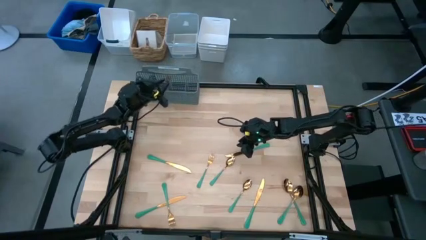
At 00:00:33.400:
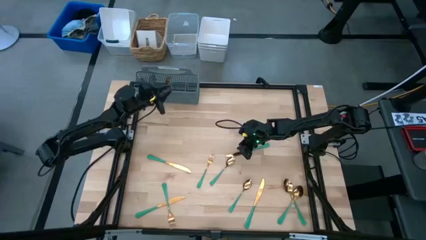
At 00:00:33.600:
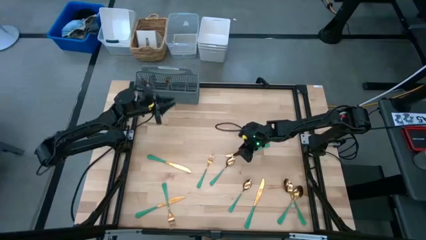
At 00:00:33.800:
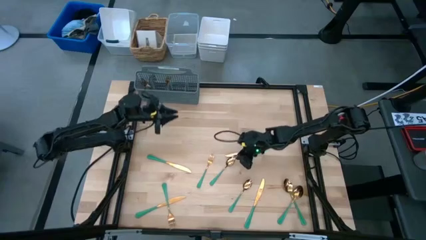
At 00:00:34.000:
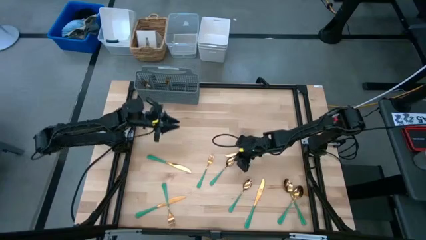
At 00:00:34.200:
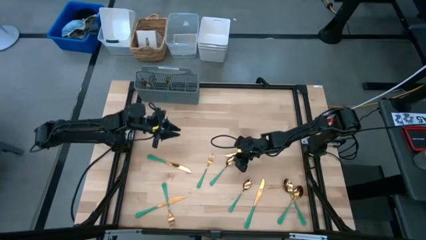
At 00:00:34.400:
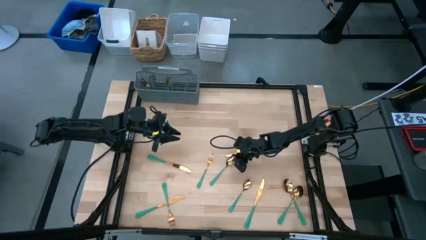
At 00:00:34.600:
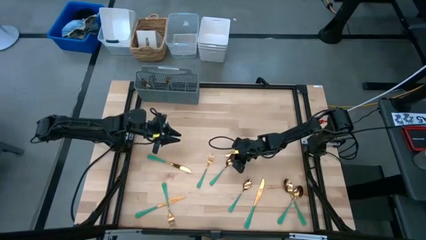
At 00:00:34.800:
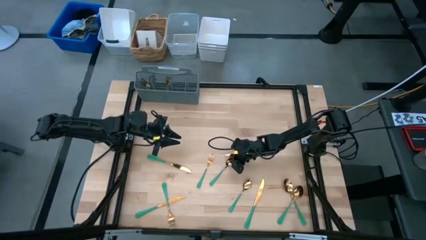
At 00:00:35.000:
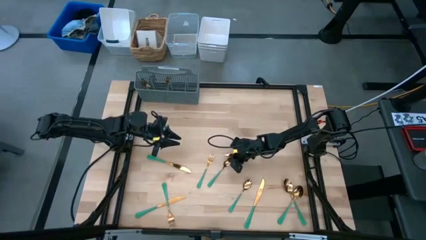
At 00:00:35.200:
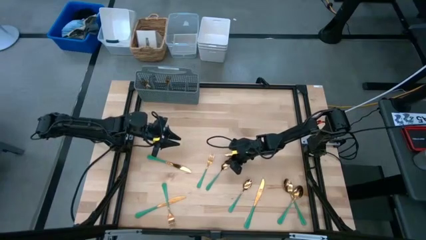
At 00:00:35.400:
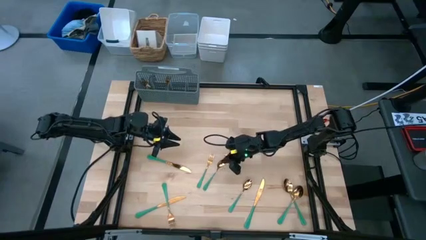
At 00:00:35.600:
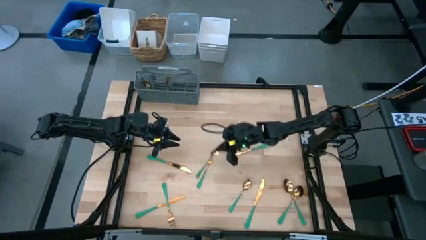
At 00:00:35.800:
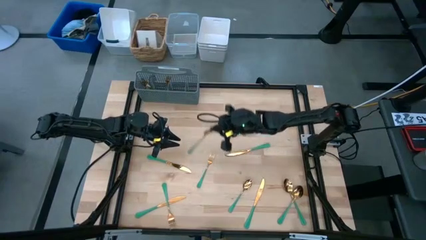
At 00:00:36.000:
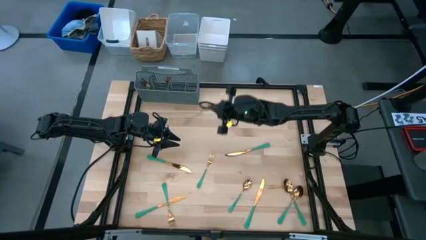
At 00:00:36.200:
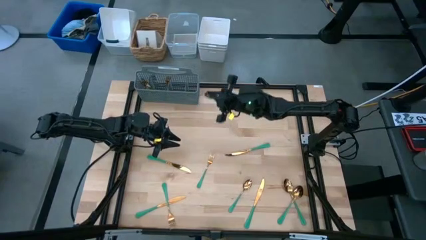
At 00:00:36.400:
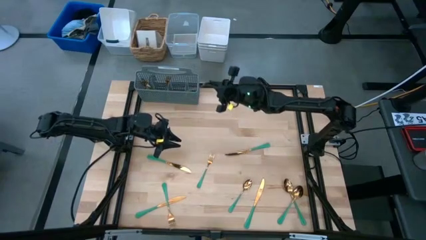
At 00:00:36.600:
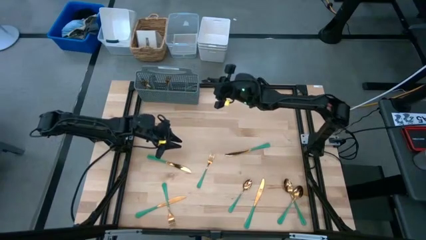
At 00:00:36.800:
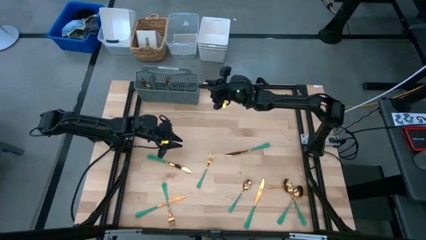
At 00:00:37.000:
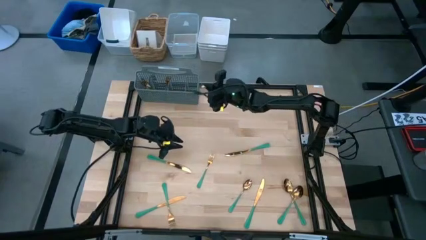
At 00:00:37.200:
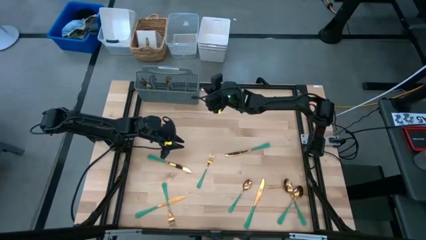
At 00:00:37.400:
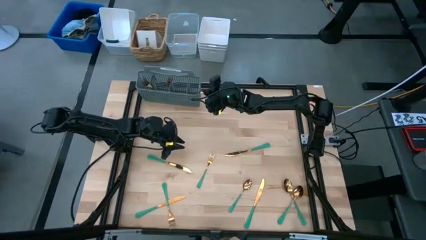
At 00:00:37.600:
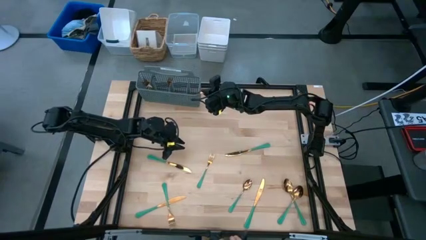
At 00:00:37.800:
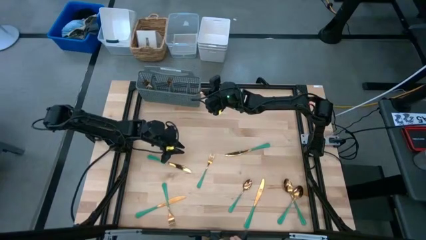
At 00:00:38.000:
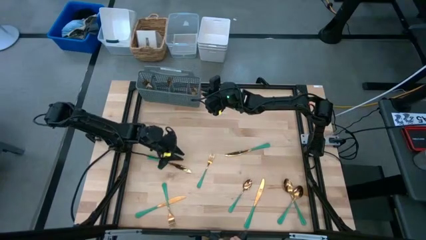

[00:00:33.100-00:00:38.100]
Task: Sort silverware
Put the green spoon into the gray silverware basket

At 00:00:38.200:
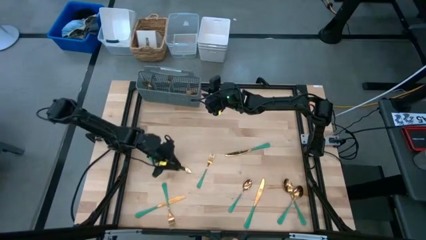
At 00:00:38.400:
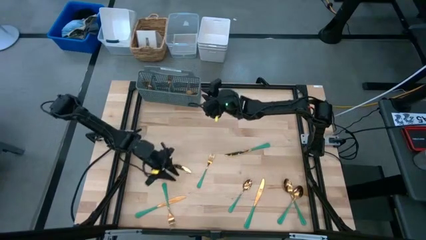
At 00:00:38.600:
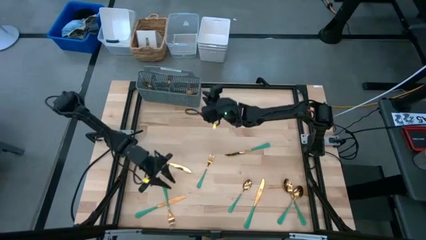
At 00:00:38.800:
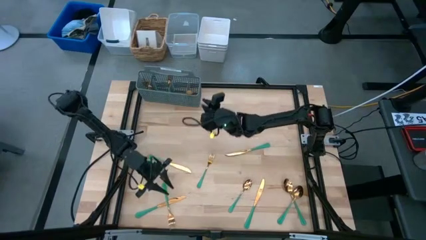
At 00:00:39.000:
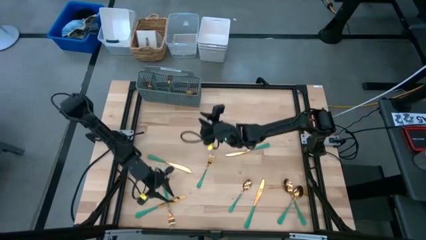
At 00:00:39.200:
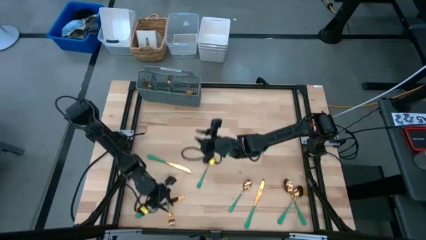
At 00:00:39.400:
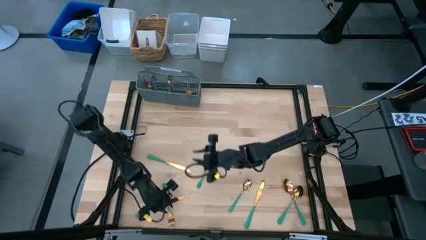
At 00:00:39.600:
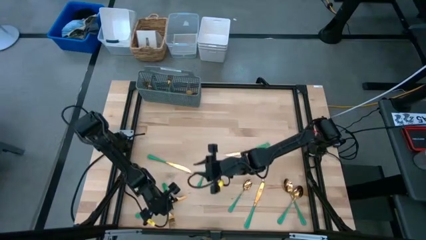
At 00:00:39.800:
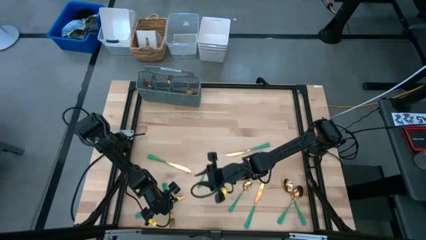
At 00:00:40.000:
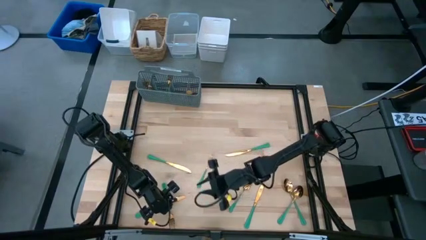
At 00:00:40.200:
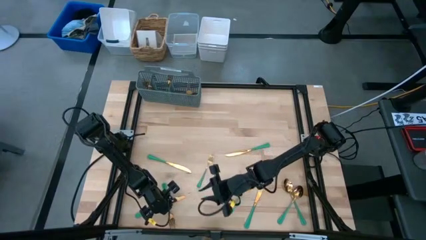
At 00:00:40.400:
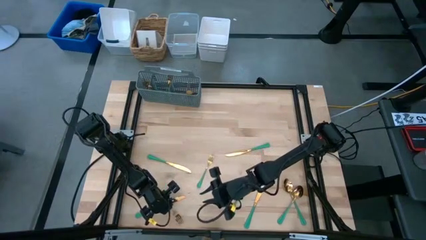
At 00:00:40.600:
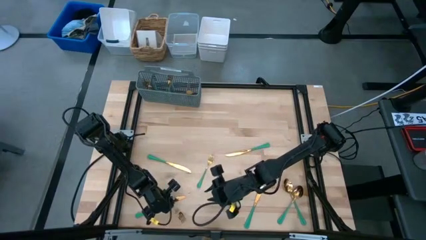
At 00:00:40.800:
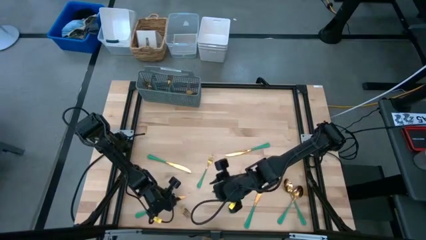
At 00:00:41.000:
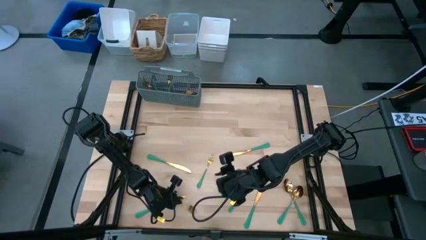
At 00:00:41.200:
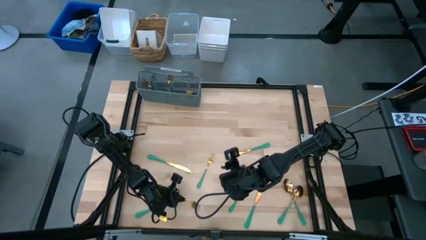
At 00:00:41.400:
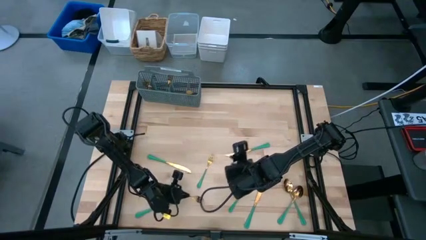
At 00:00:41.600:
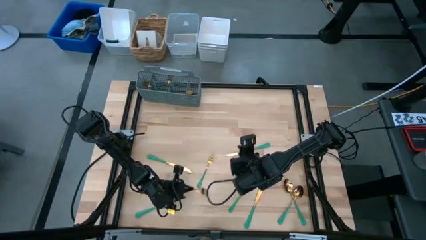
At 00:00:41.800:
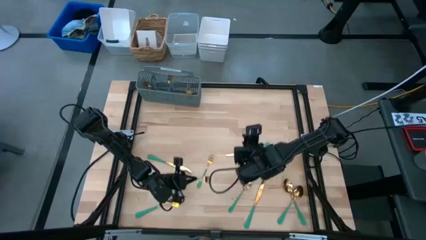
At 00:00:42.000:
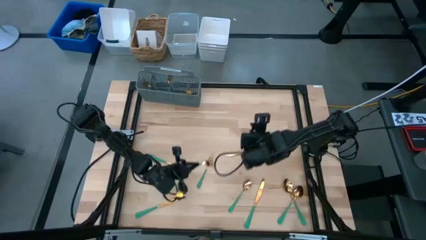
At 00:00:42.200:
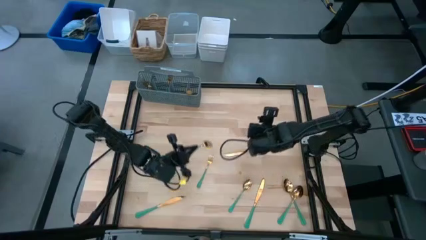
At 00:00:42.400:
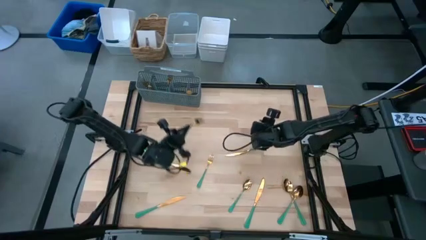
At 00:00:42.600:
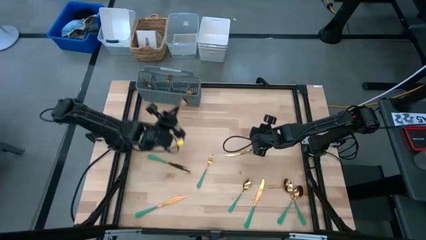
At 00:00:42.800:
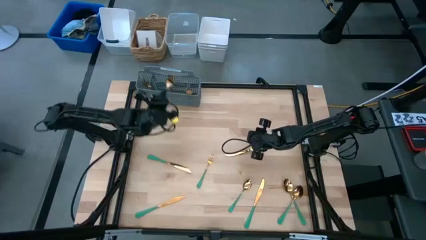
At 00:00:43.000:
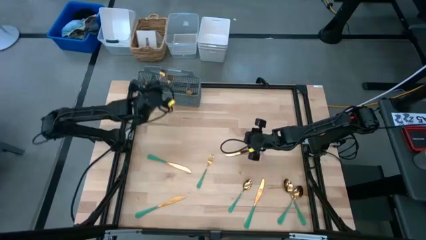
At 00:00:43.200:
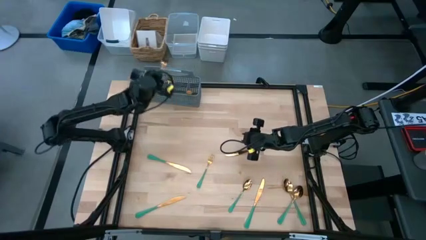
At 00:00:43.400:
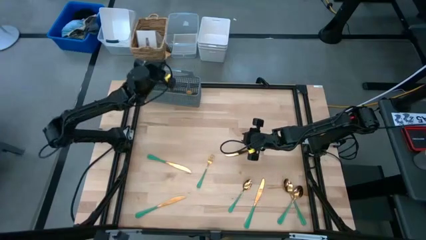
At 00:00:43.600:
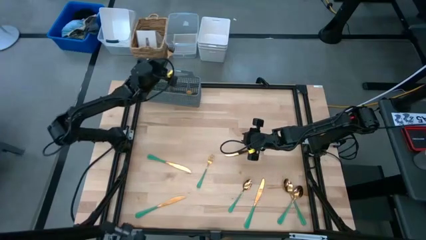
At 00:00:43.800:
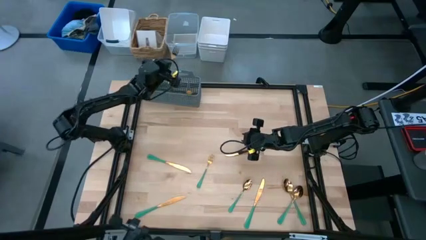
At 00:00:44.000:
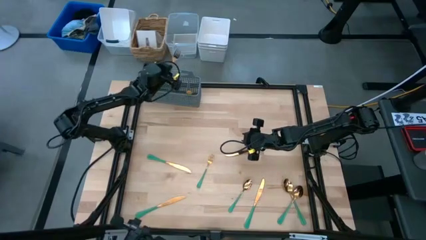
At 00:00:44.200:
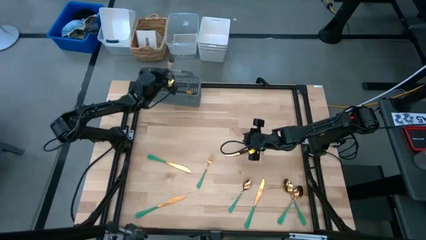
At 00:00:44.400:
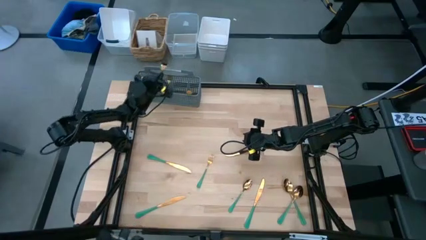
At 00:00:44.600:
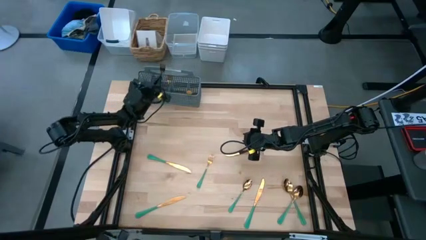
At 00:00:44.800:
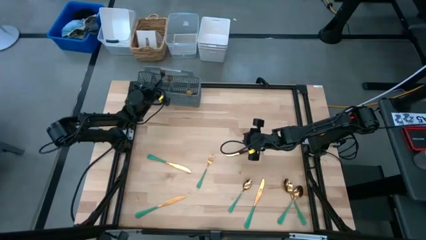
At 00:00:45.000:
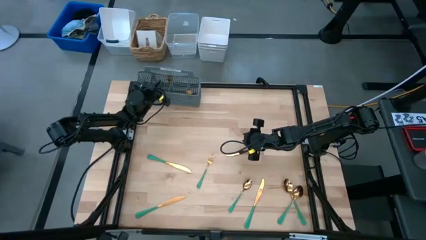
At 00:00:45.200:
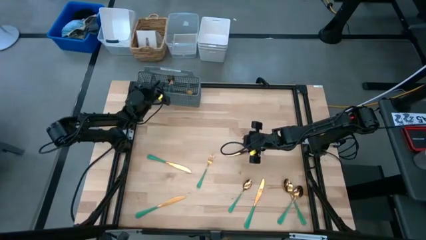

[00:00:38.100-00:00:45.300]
Put the green fork into the gray silverware basket

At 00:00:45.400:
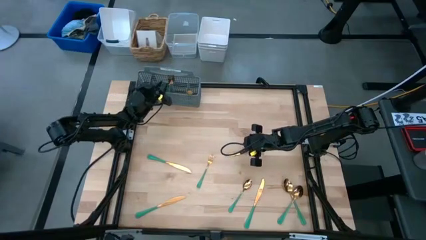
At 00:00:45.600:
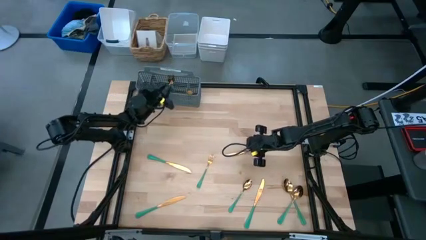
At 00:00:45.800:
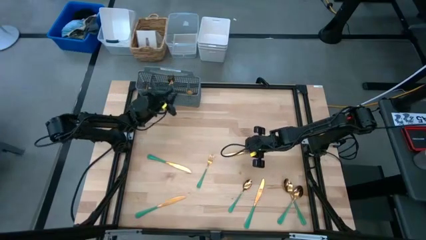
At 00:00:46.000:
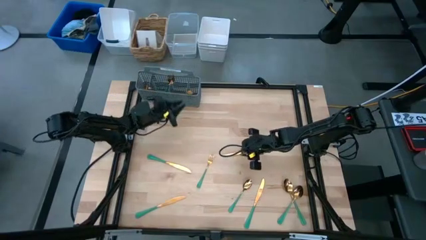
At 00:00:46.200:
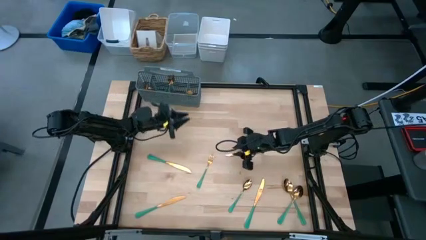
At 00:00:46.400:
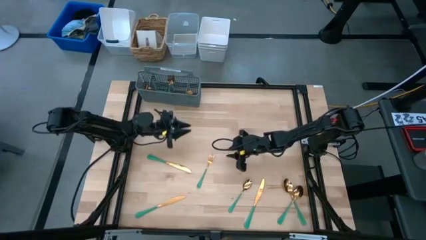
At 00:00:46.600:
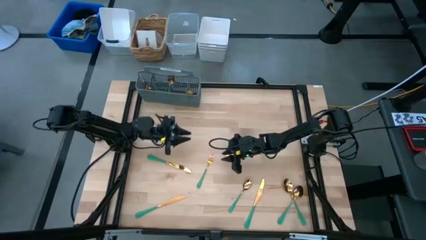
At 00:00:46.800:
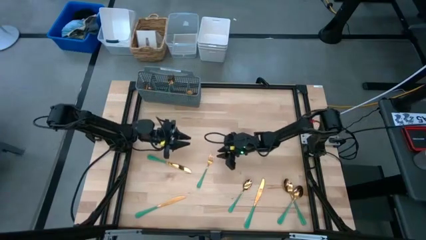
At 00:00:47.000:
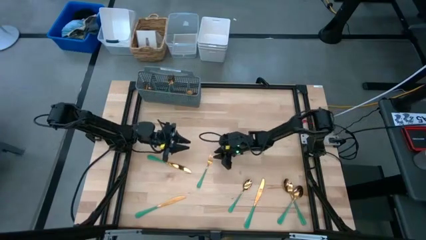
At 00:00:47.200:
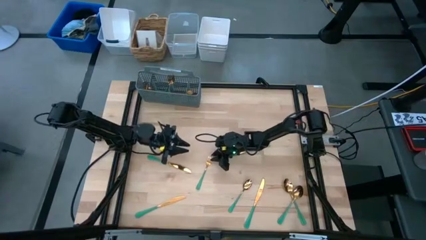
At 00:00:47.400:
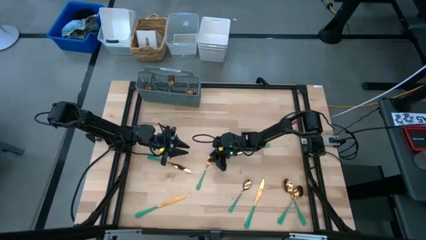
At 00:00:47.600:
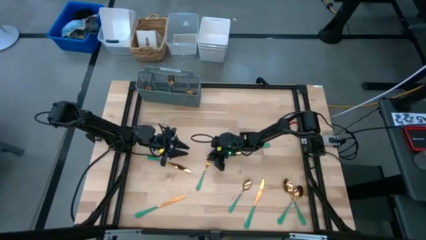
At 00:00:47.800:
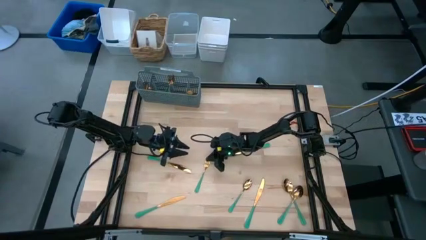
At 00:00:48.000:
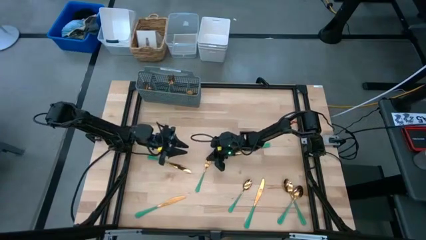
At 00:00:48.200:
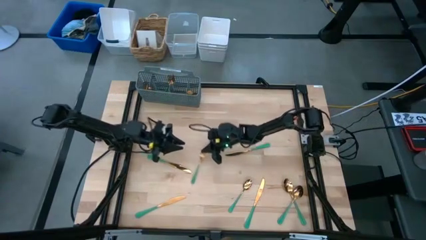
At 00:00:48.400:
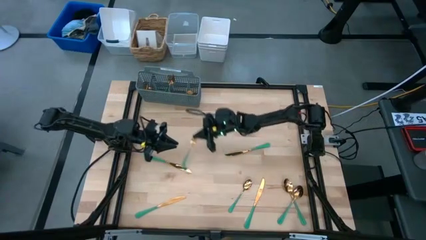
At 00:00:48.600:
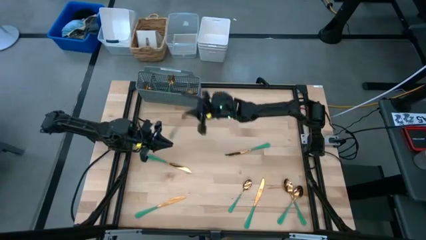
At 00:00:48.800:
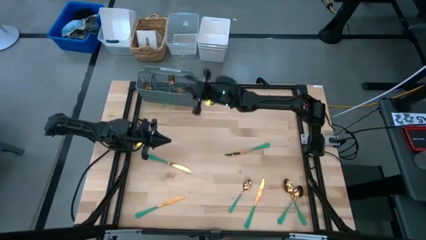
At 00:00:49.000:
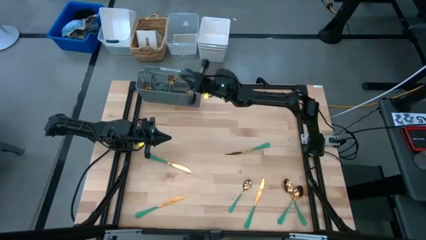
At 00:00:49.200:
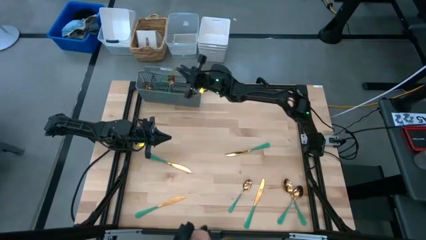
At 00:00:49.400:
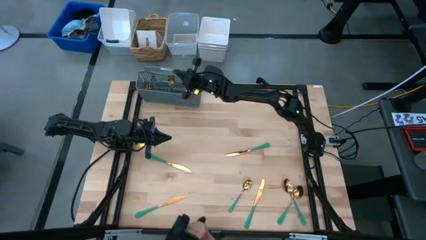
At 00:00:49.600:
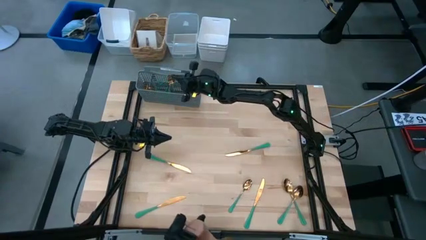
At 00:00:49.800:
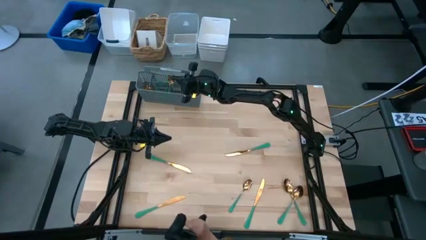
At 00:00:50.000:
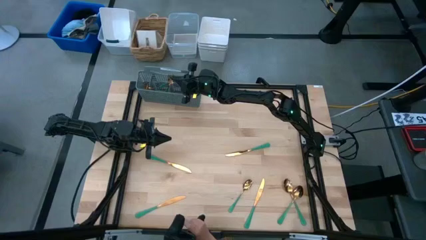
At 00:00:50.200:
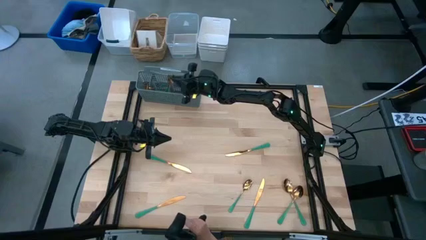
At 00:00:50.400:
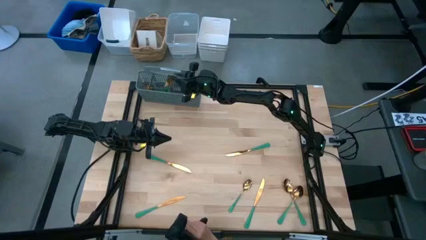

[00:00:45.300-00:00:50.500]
Put the green fork into the gray silverware basket
